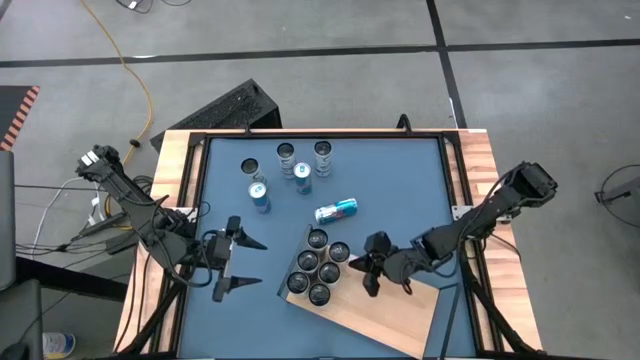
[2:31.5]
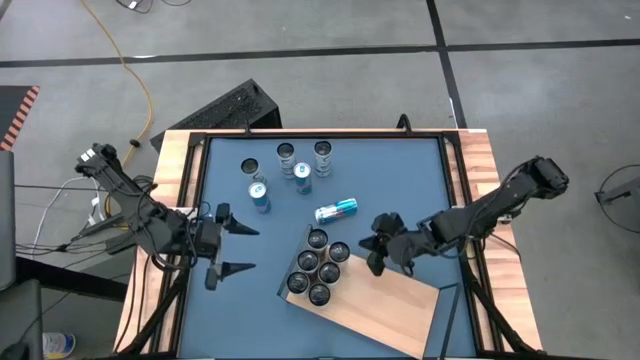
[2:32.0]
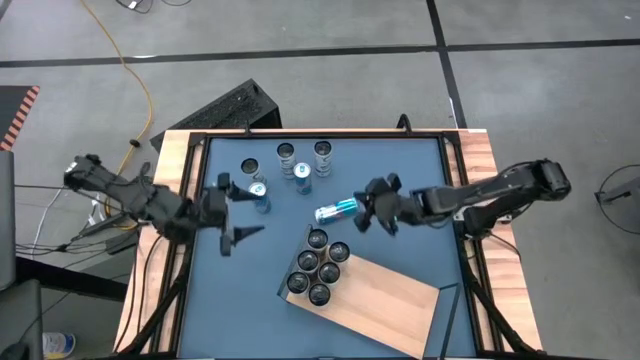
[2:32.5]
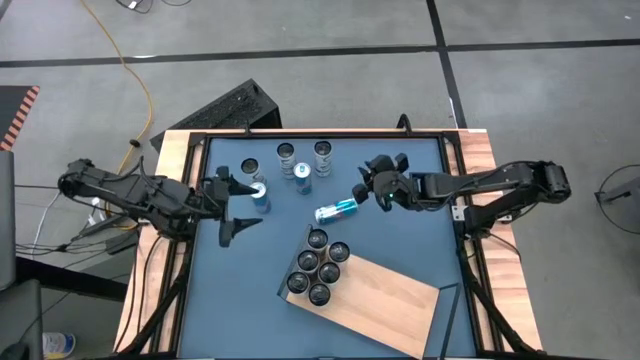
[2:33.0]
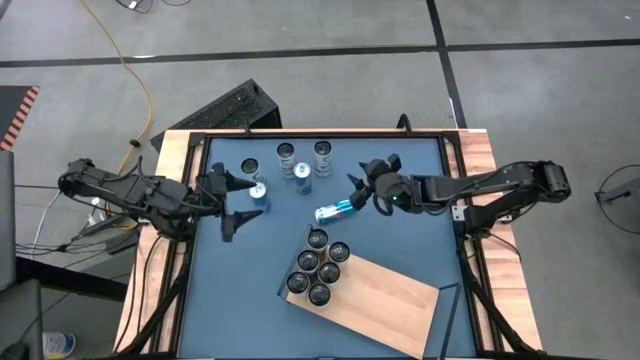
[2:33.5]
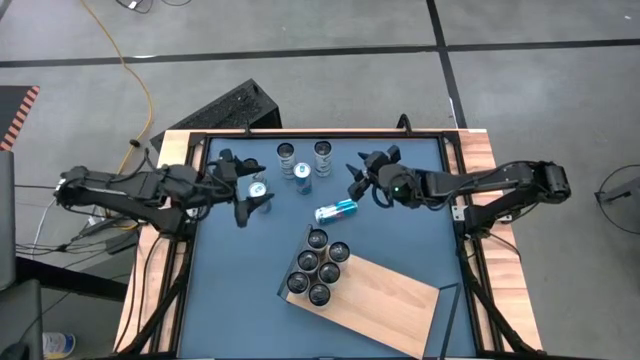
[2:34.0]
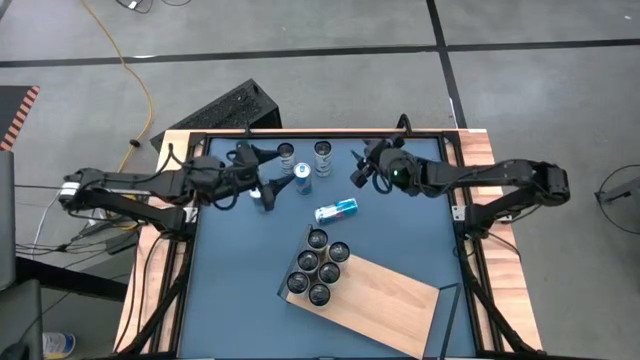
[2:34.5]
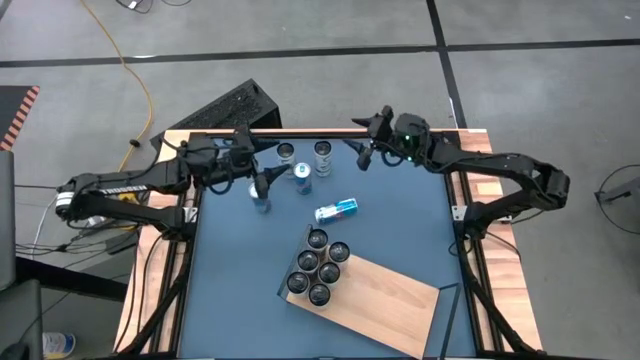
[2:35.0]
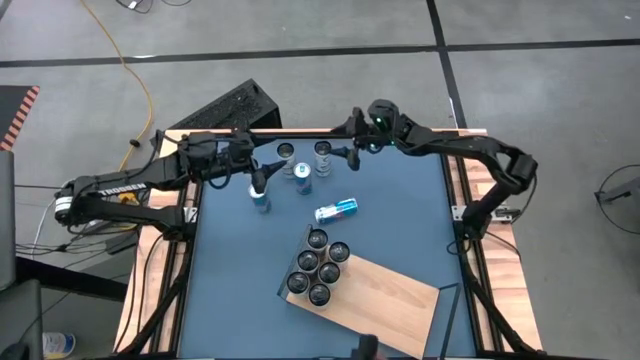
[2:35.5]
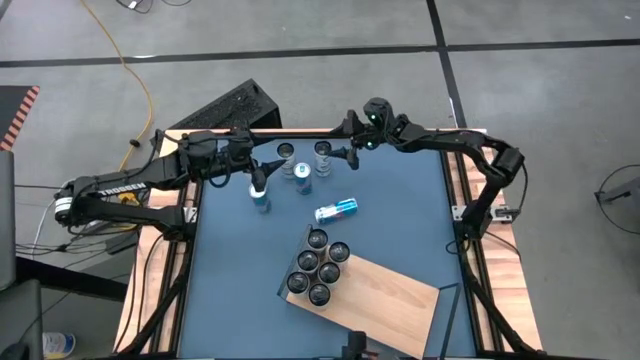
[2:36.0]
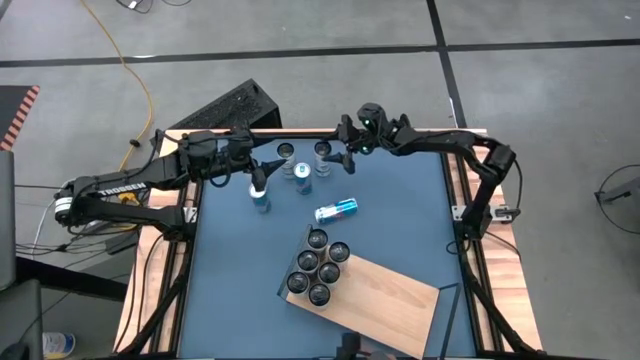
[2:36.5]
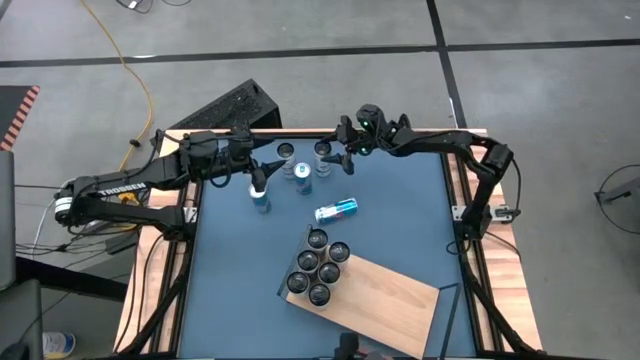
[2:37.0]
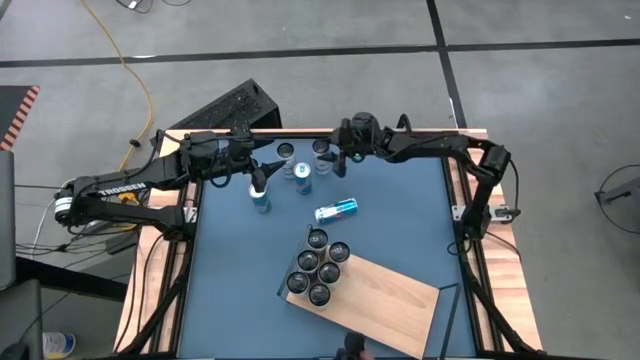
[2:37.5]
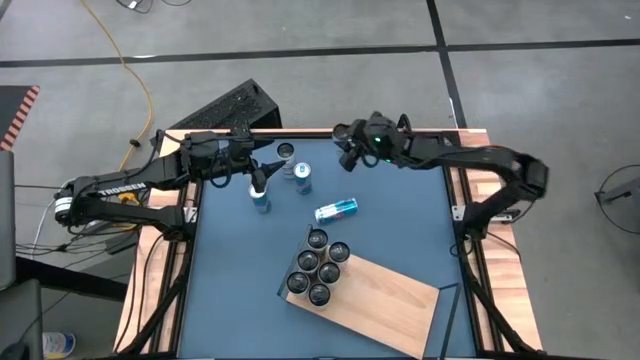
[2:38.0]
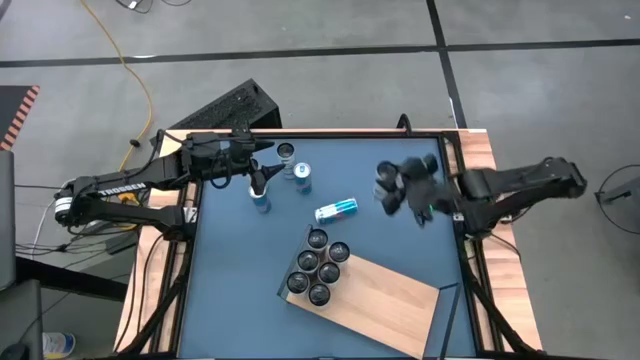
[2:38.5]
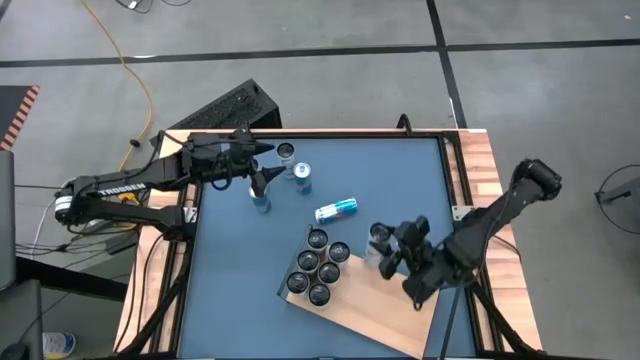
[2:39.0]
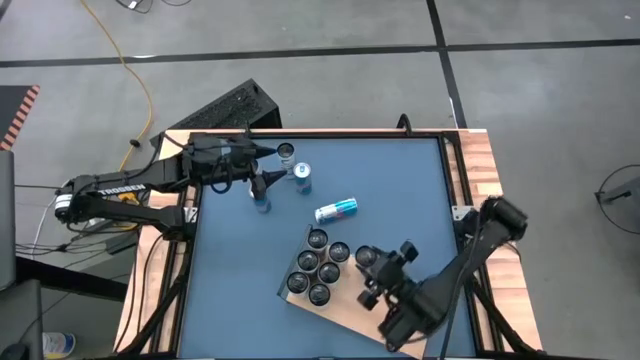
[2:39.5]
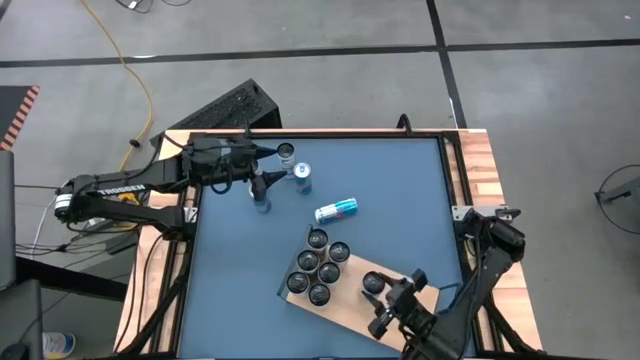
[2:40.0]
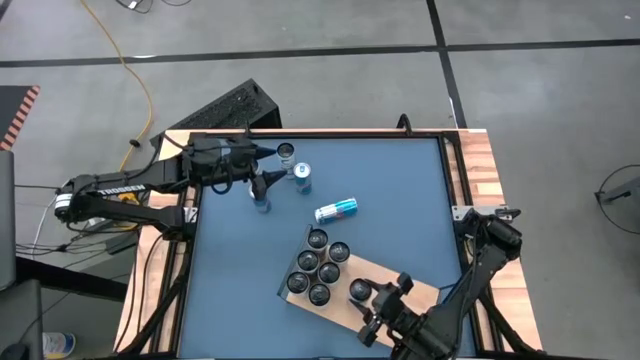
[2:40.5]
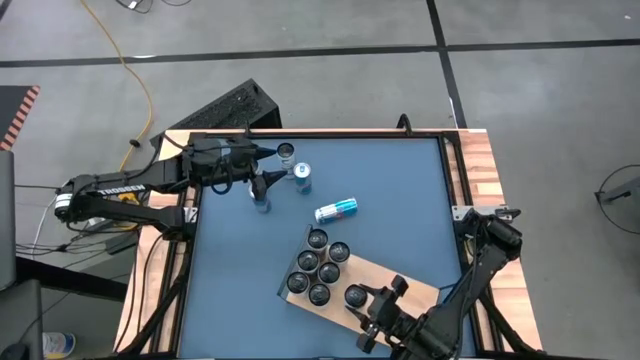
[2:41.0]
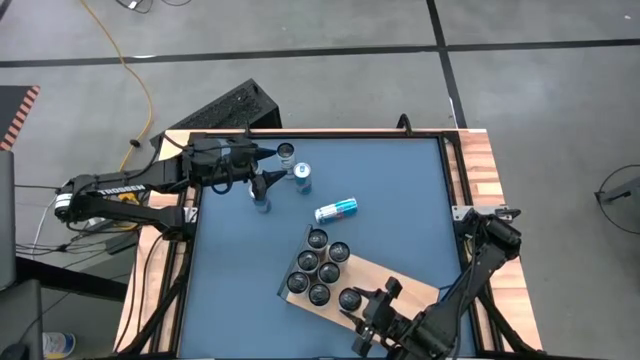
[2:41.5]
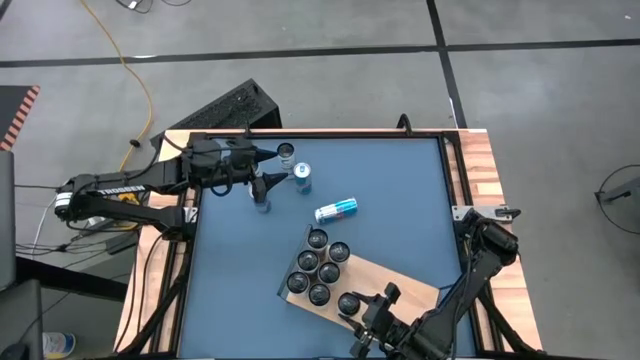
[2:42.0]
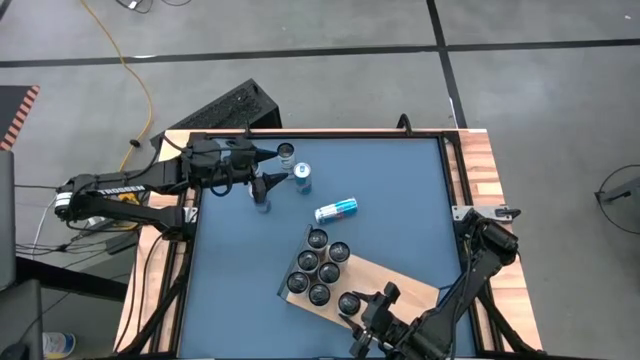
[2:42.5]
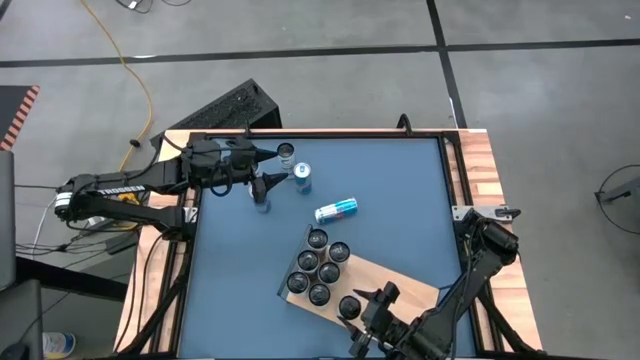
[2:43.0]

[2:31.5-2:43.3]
Task: Place canned beverage on shelf
Put the right white blue soda can on the shelf

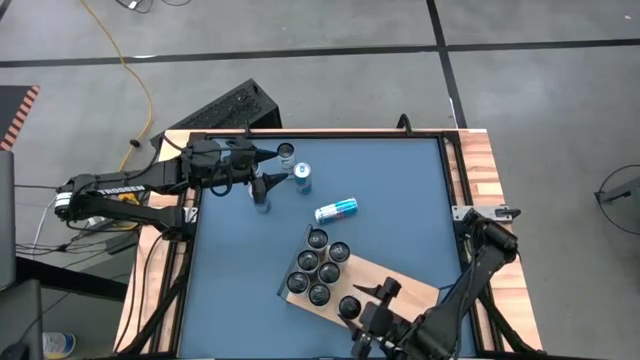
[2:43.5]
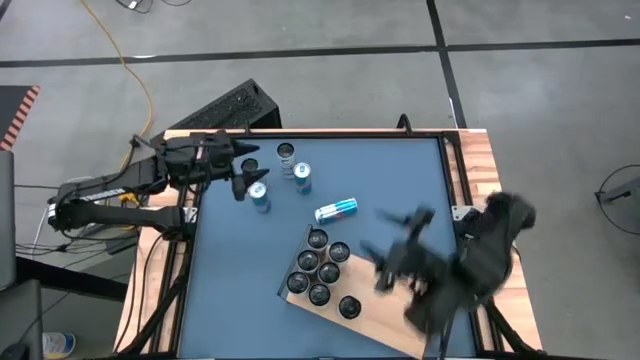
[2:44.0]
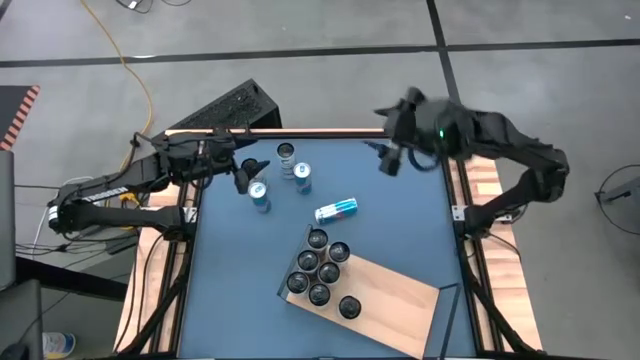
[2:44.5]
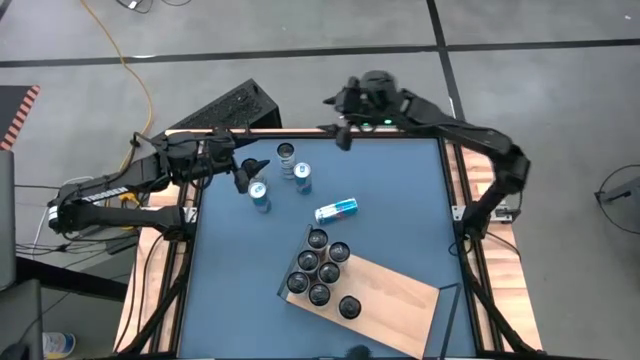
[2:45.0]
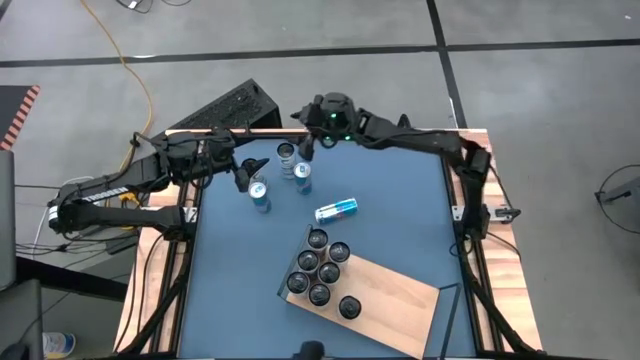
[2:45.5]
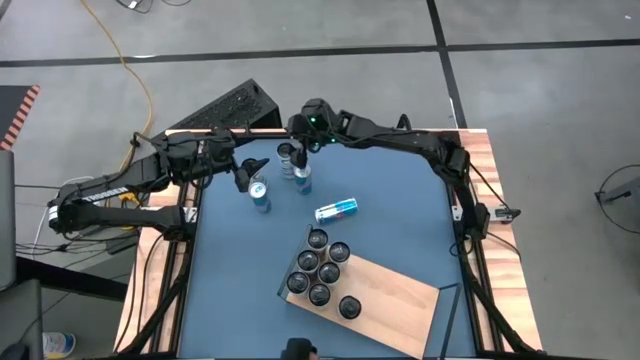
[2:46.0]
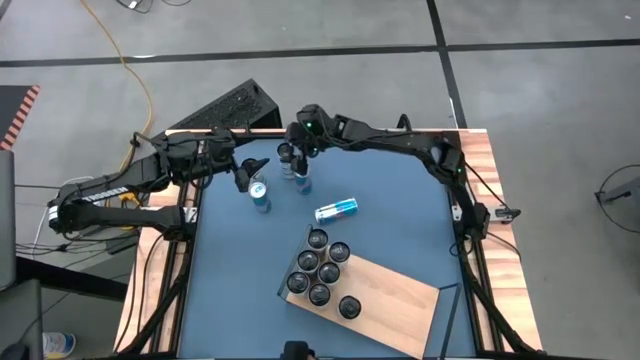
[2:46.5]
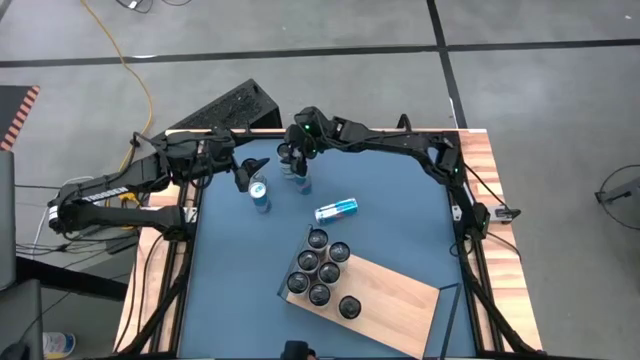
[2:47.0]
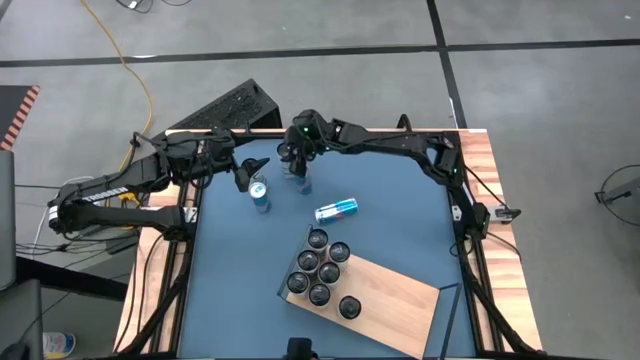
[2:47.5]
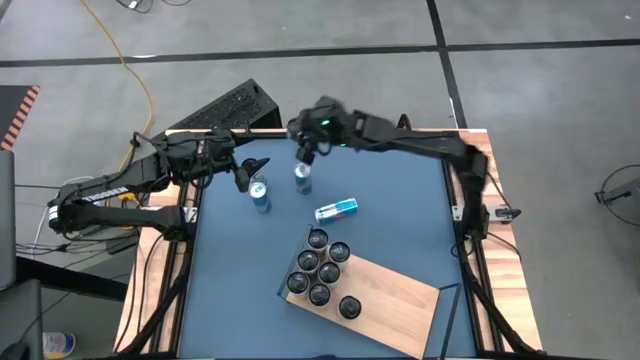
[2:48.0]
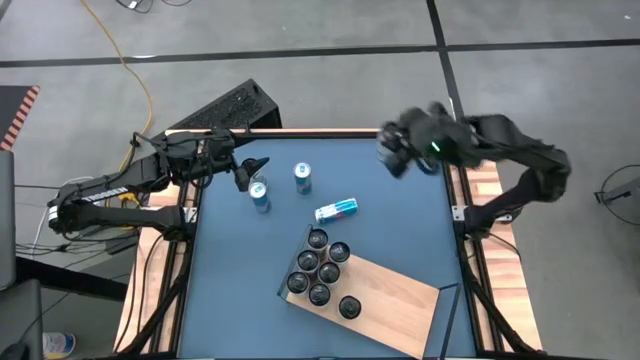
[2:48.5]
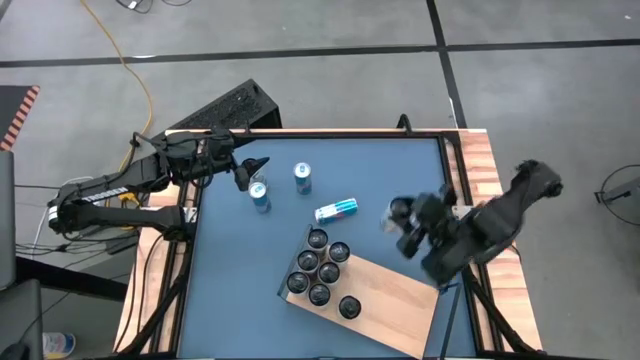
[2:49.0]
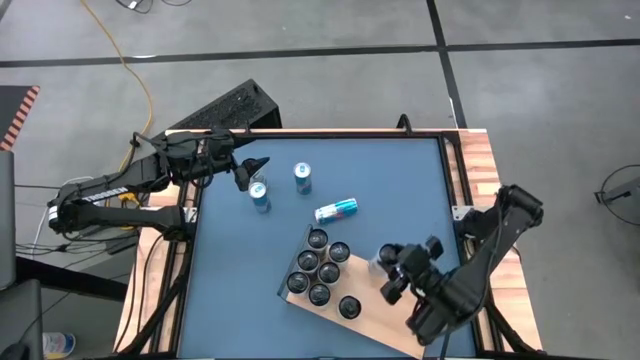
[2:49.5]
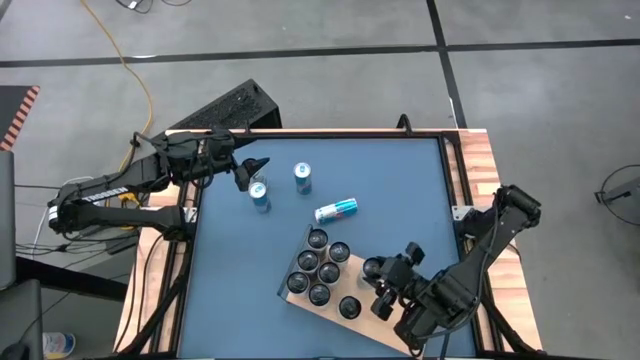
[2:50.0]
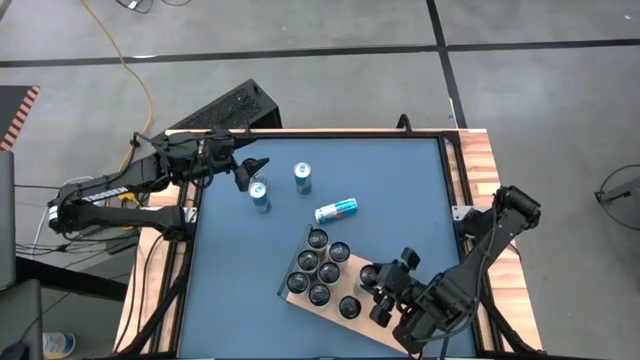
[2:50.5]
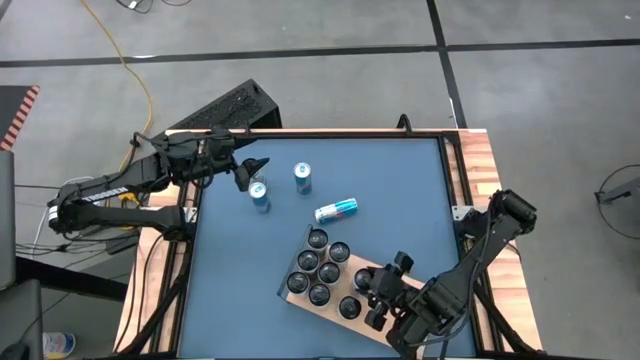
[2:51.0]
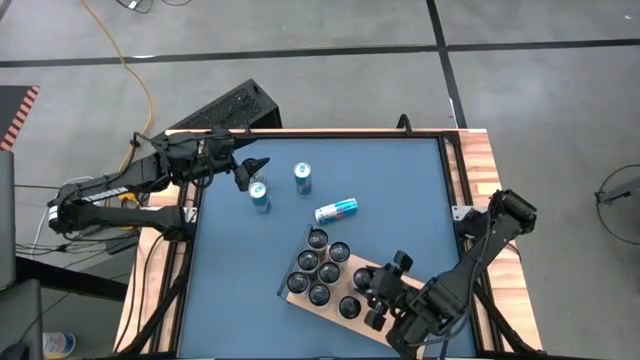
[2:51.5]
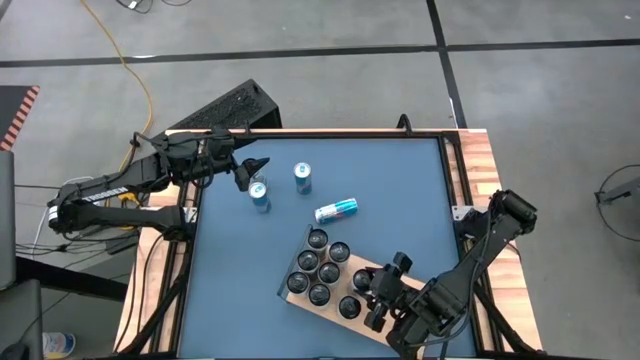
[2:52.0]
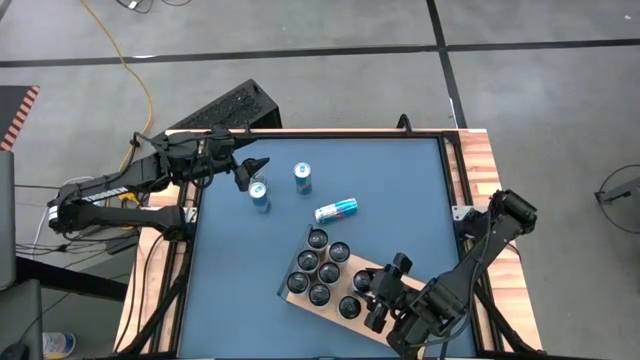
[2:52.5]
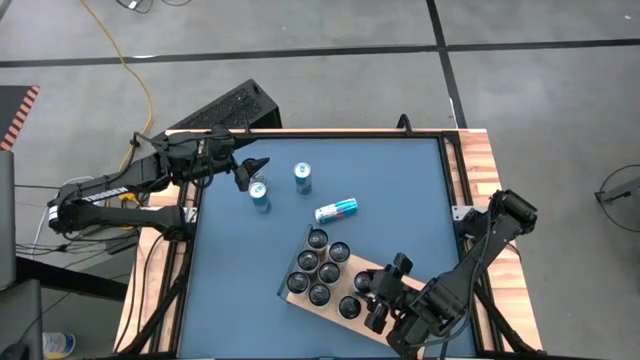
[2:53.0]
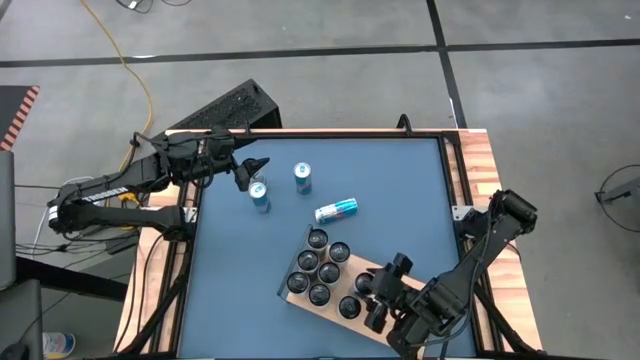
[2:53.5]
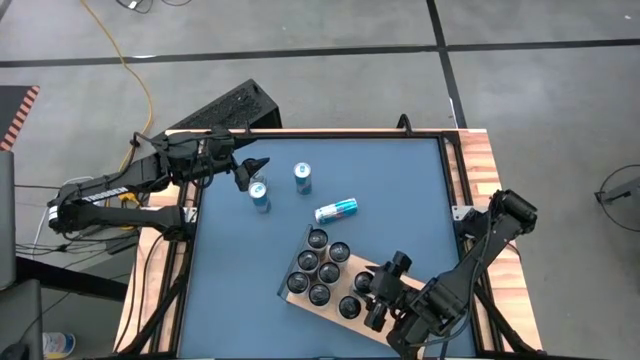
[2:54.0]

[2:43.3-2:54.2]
Put the top white blue soda can aligned with the other white blue soda can on the shelf
